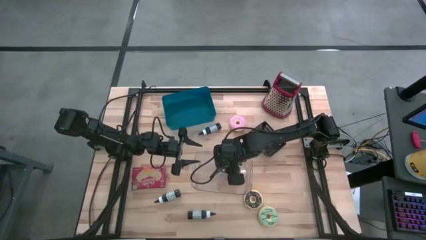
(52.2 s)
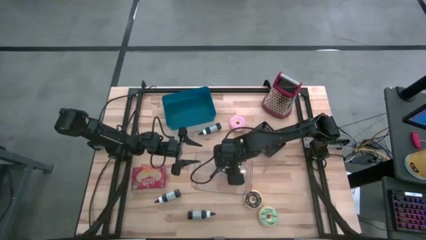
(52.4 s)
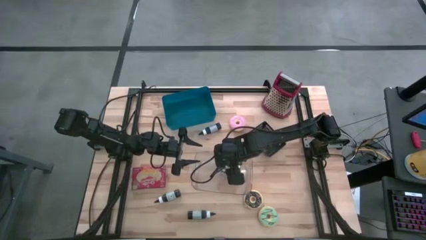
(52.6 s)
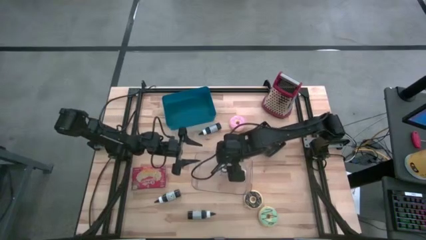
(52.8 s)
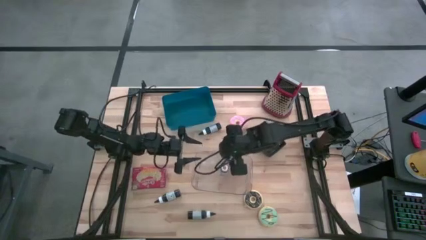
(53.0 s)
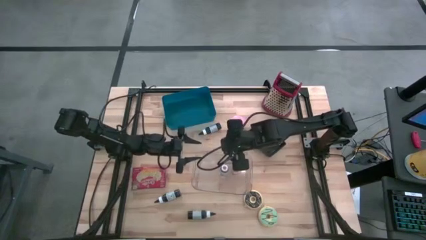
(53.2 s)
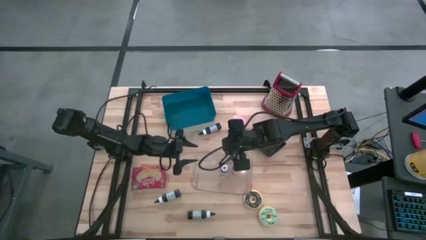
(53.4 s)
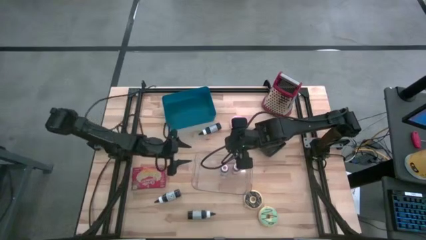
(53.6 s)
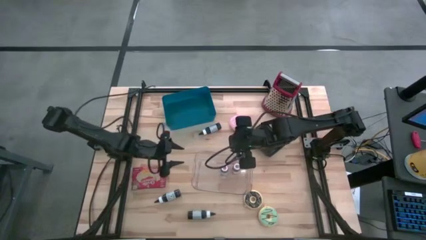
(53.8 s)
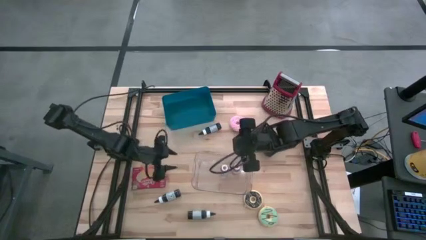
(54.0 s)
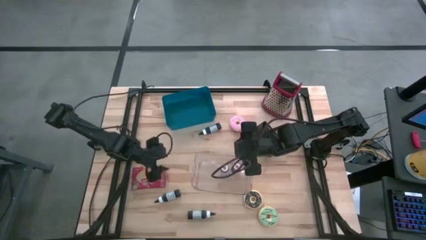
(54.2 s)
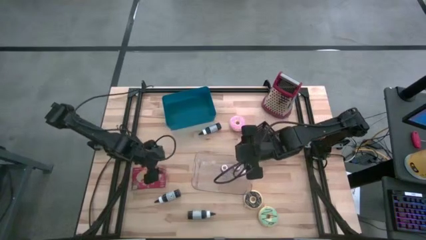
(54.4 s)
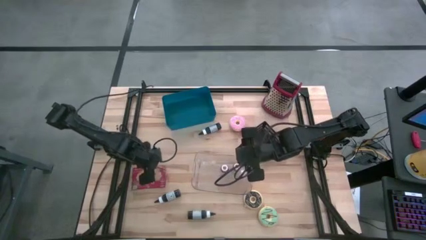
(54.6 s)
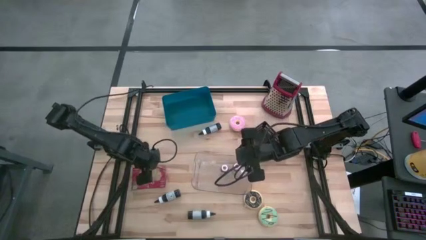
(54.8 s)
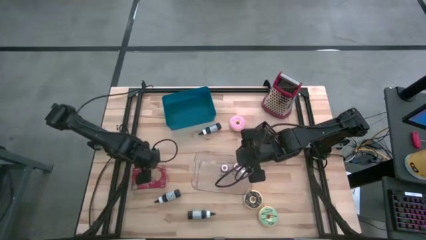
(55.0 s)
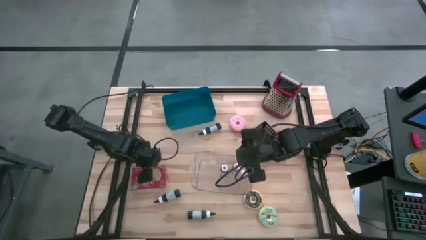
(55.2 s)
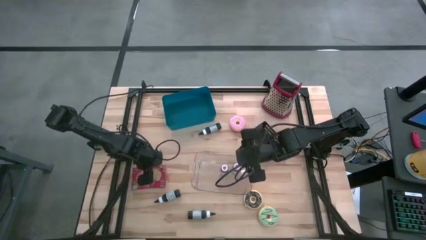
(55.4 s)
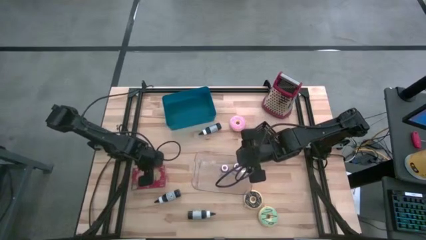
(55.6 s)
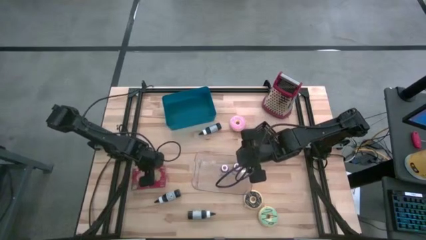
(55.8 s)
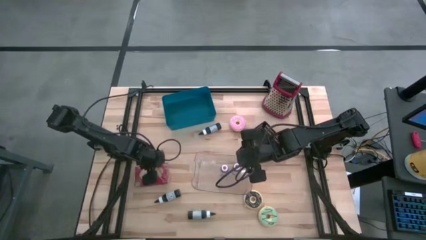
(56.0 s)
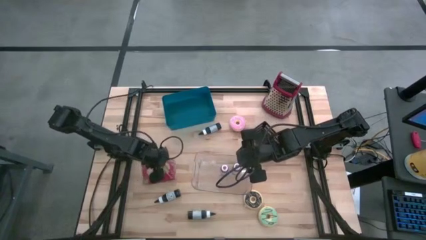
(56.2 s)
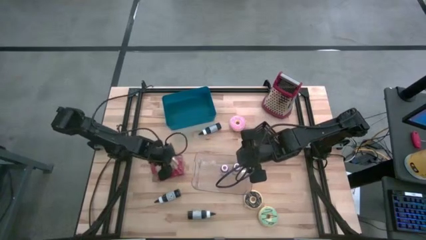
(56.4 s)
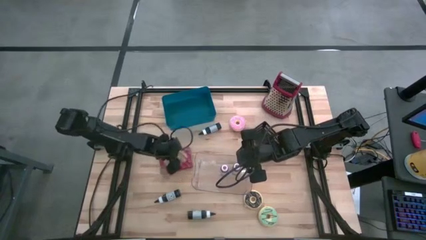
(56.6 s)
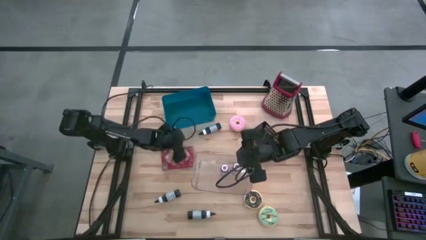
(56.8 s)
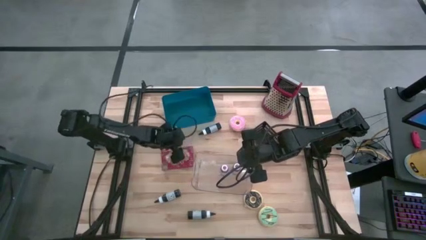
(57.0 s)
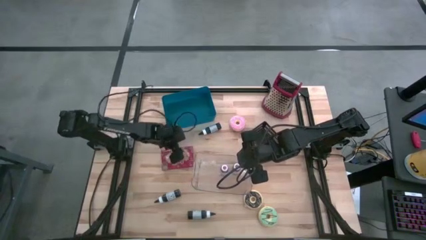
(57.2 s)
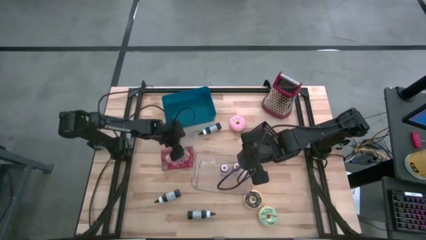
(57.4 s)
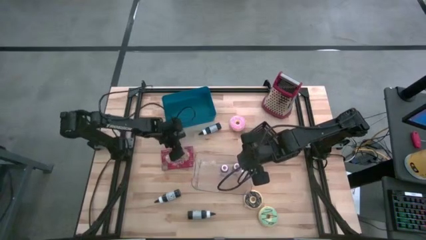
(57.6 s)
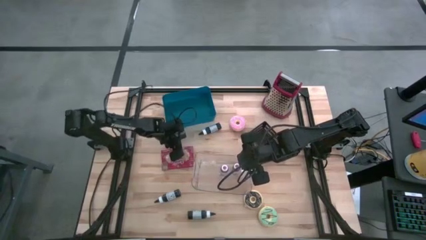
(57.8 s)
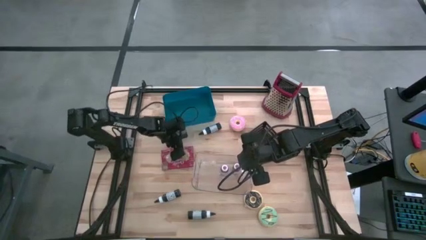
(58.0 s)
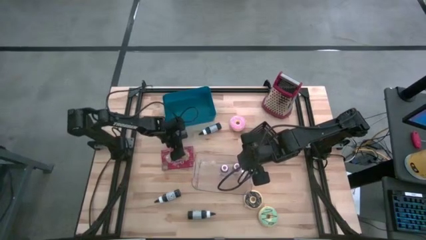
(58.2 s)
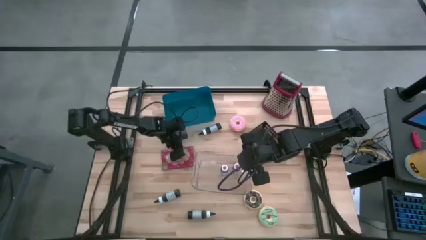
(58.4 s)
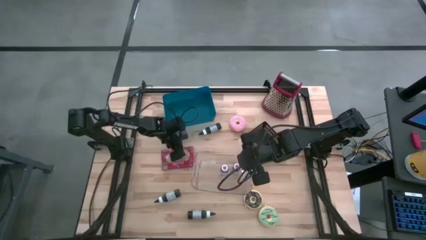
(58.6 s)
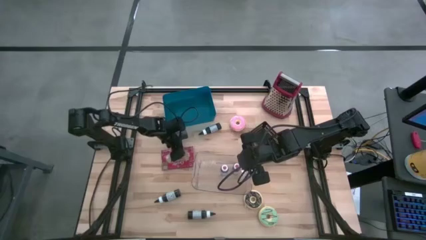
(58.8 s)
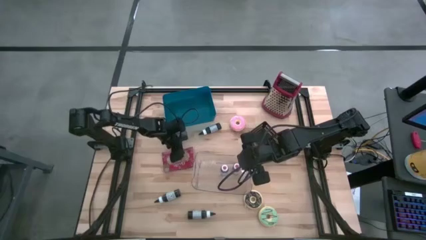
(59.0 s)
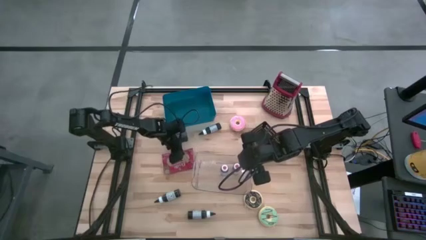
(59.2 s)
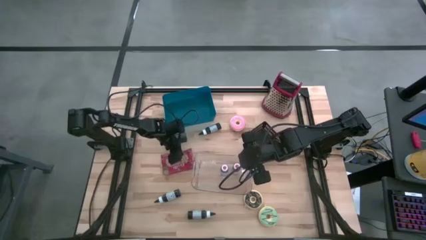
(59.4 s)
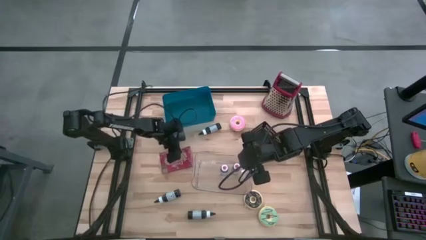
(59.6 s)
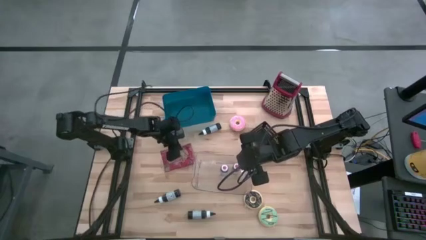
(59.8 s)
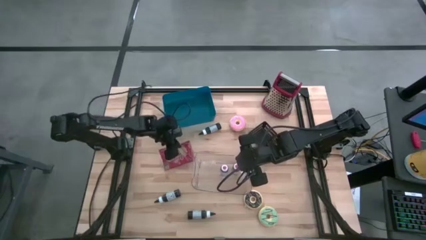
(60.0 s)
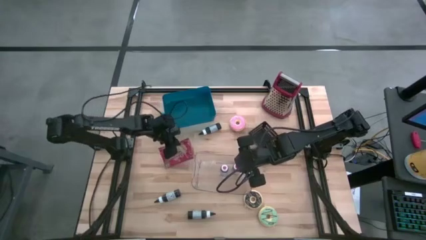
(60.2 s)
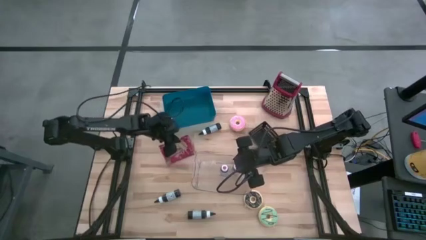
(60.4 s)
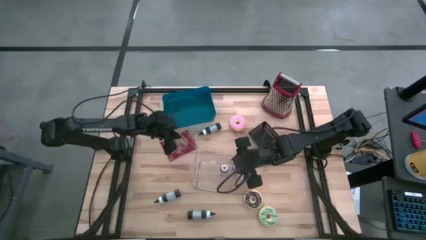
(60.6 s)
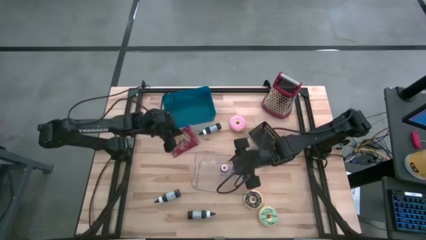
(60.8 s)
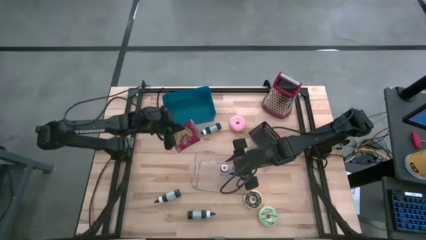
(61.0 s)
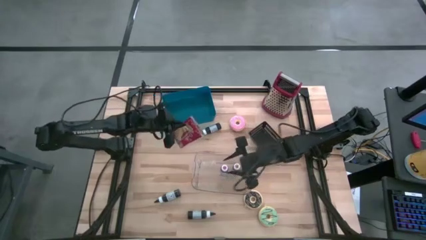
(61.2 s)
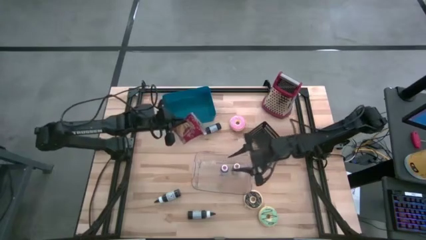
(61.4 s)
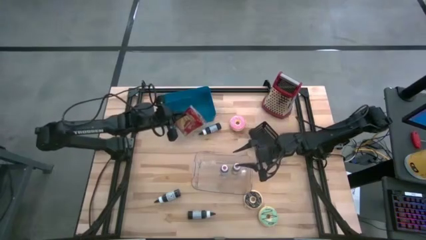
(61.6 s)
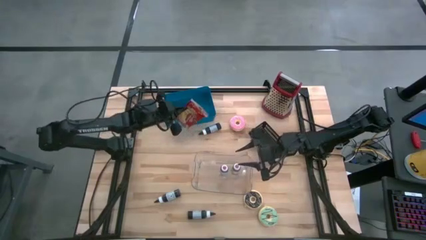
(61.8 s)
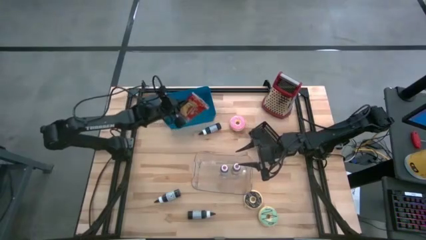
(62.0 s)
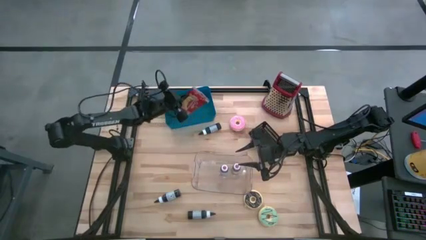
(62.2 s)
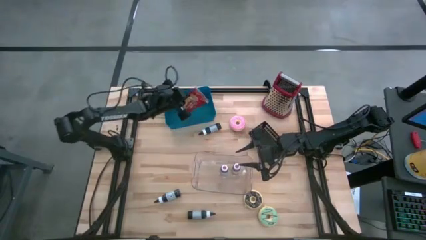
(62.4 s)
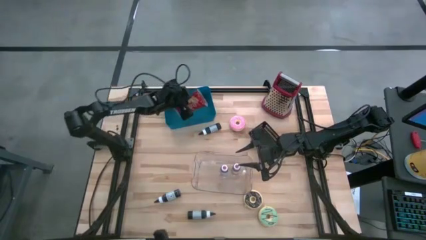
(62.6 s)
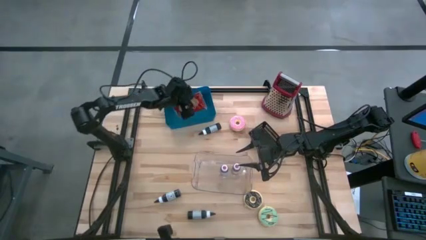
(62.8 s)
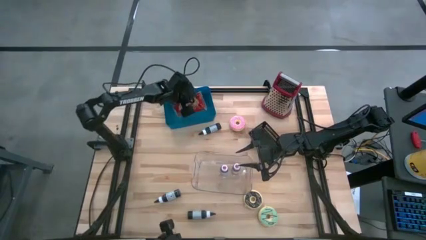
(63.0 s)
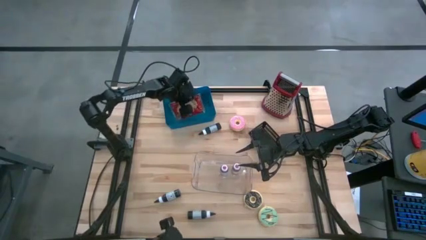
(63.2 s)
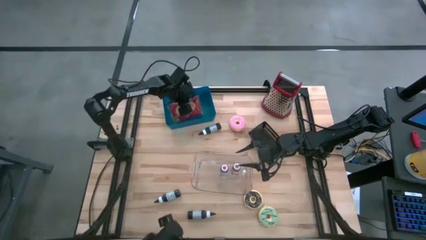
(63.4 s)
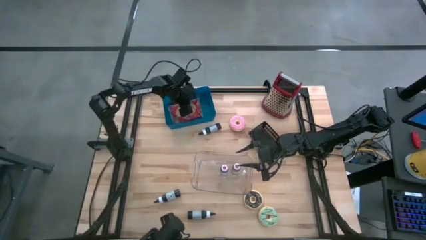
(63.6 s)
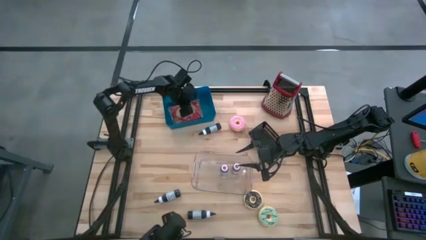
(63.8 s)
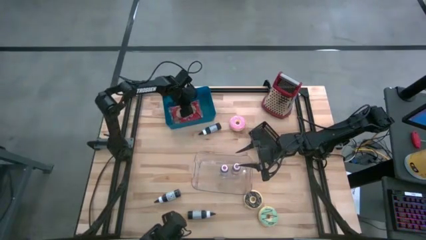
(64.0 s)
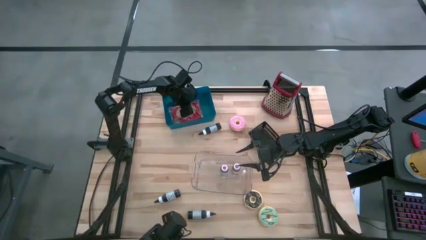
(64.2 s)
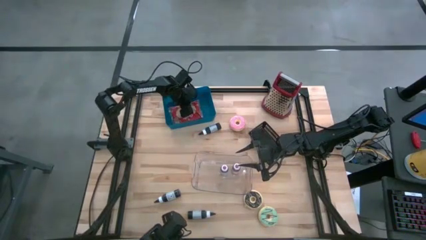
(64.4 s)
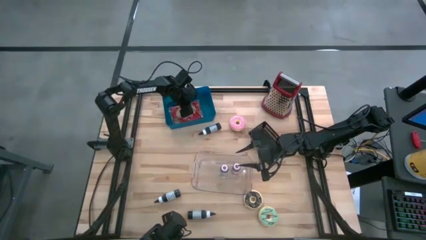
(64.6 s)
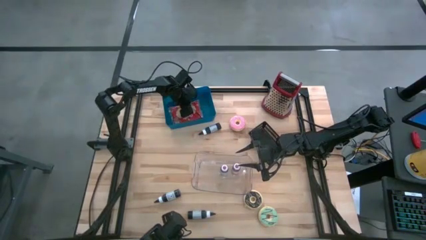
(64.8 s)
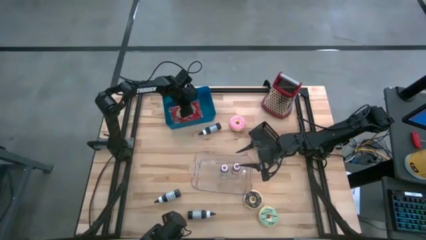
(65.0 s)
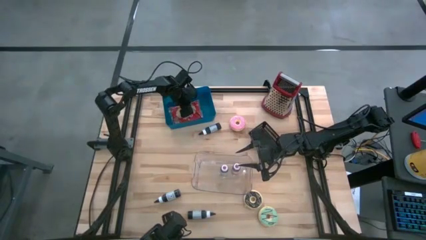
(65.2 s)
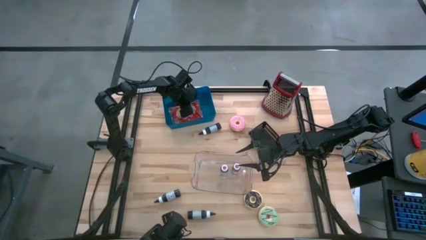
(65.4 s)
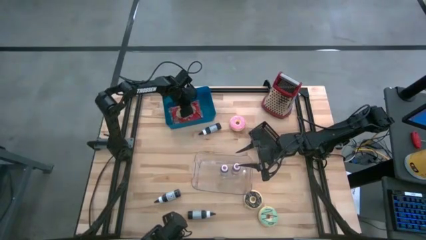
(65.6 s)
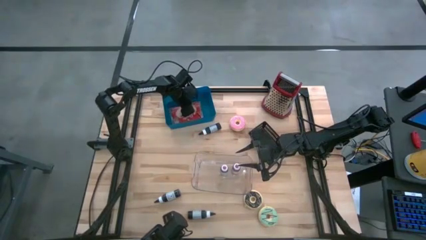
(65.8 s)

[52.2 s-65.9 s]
Put the popcorn bag into the blue bin
